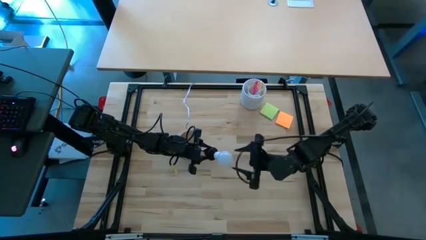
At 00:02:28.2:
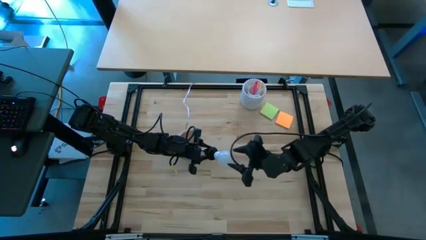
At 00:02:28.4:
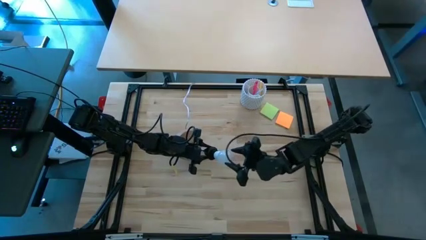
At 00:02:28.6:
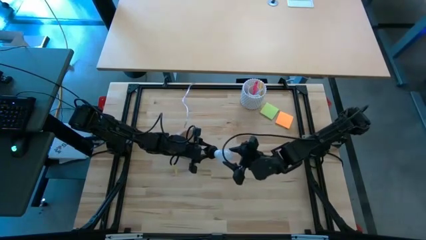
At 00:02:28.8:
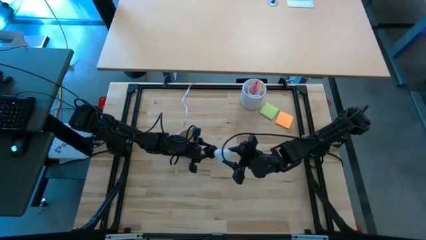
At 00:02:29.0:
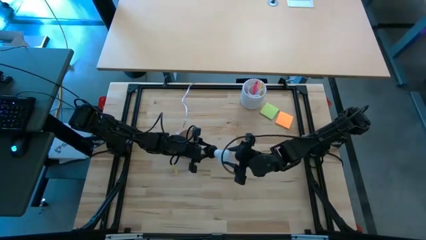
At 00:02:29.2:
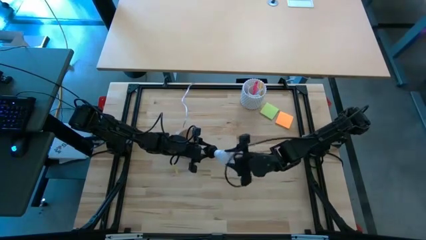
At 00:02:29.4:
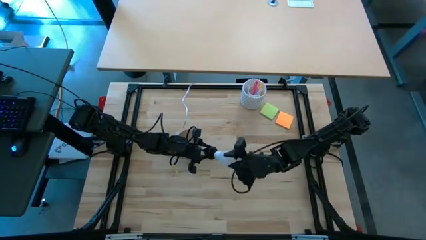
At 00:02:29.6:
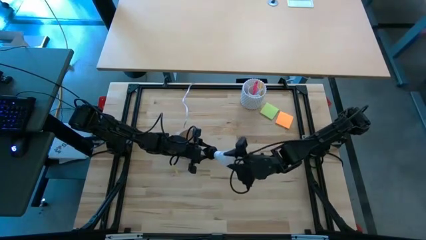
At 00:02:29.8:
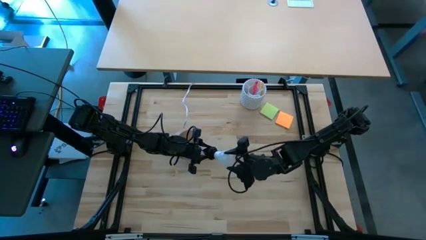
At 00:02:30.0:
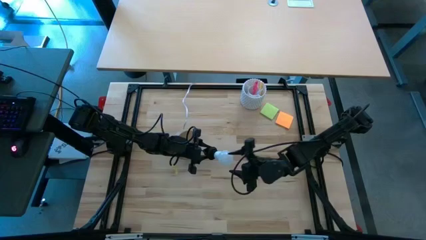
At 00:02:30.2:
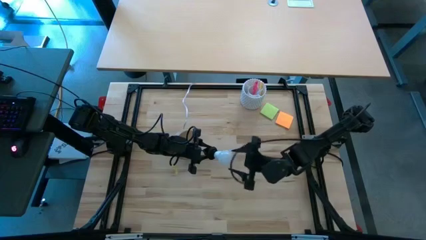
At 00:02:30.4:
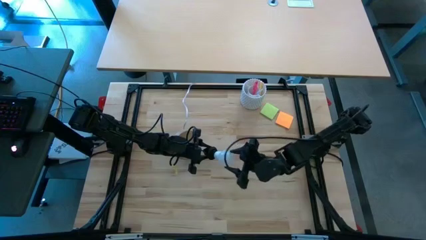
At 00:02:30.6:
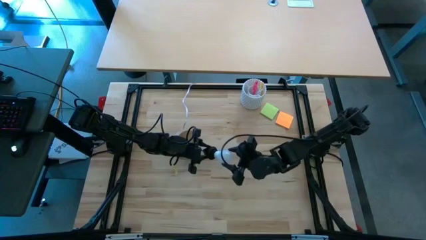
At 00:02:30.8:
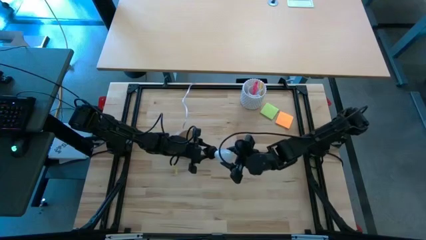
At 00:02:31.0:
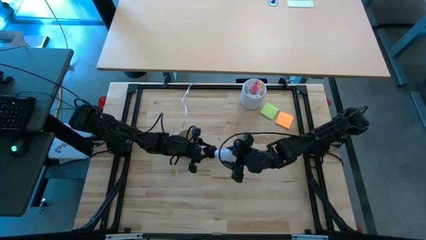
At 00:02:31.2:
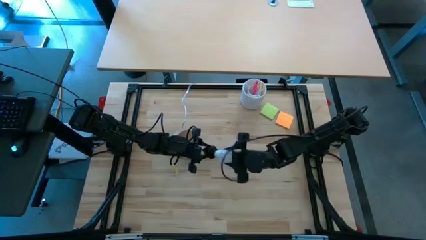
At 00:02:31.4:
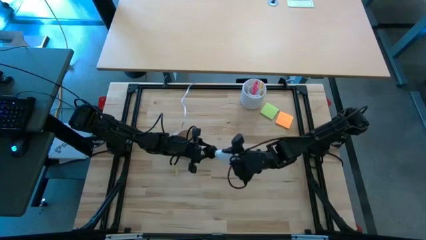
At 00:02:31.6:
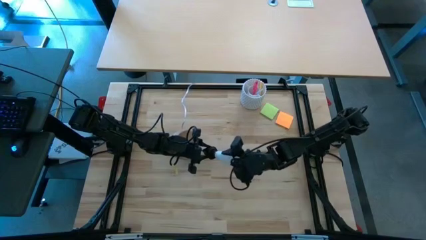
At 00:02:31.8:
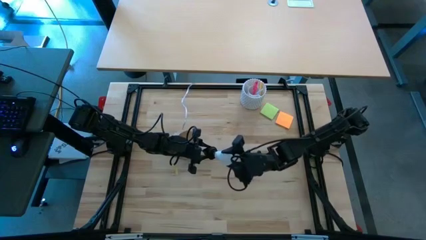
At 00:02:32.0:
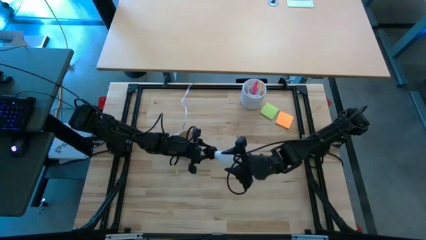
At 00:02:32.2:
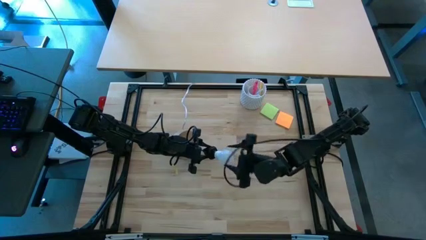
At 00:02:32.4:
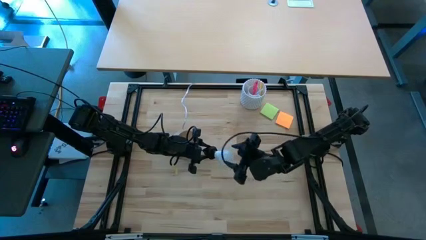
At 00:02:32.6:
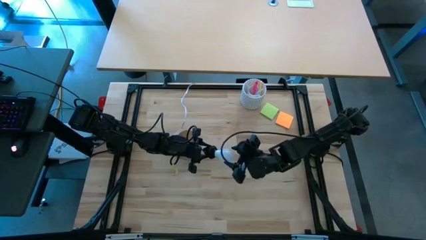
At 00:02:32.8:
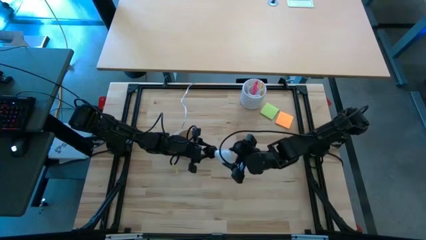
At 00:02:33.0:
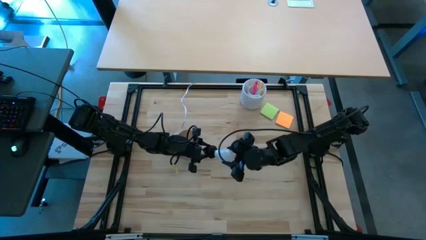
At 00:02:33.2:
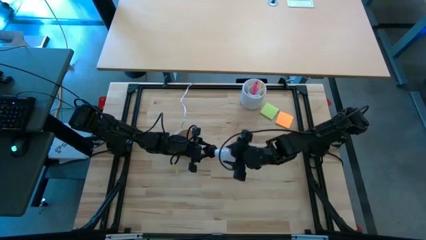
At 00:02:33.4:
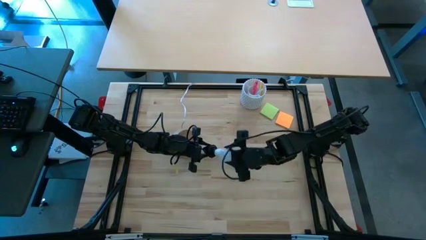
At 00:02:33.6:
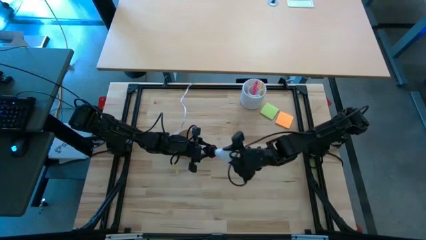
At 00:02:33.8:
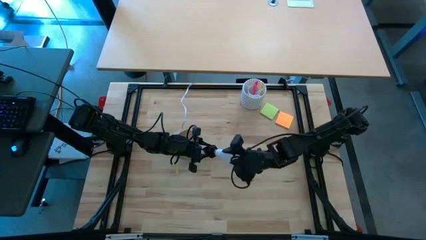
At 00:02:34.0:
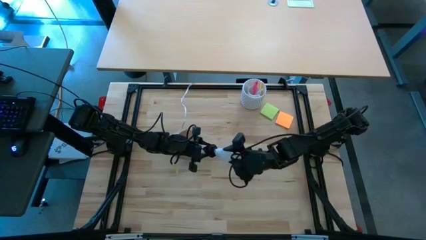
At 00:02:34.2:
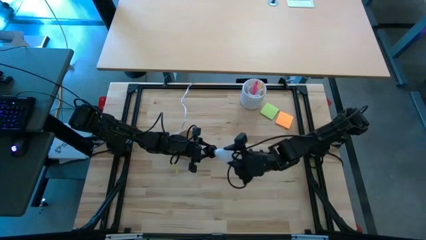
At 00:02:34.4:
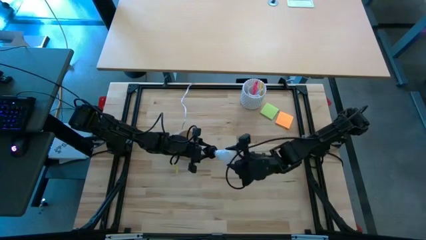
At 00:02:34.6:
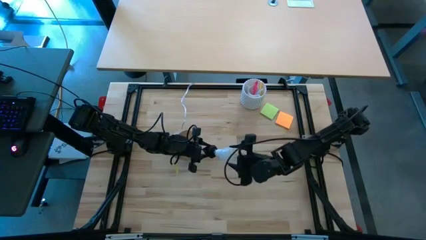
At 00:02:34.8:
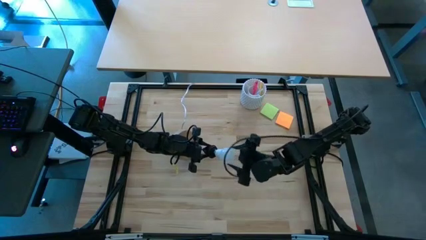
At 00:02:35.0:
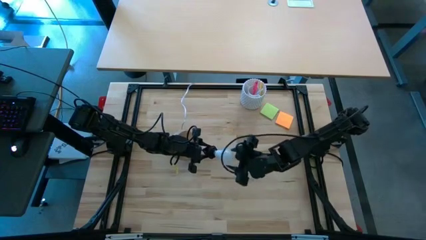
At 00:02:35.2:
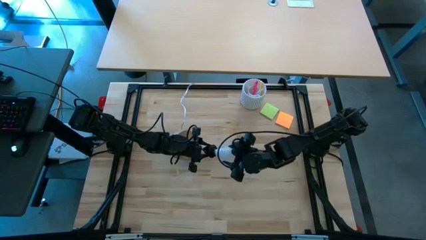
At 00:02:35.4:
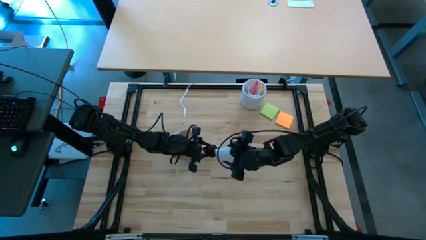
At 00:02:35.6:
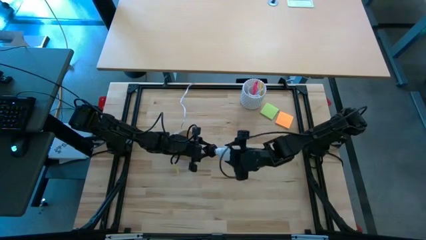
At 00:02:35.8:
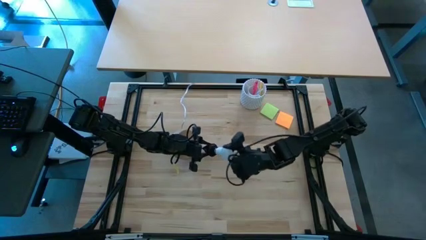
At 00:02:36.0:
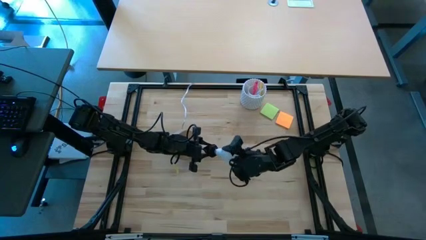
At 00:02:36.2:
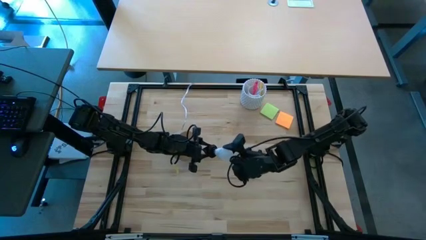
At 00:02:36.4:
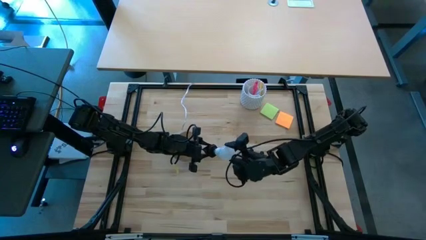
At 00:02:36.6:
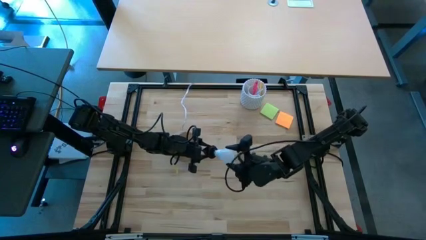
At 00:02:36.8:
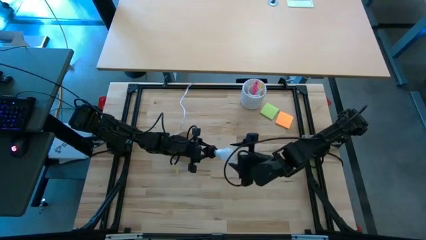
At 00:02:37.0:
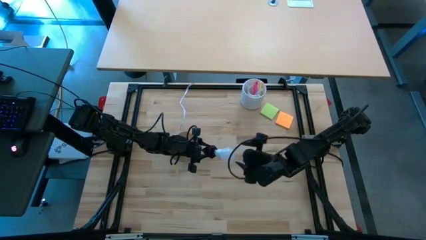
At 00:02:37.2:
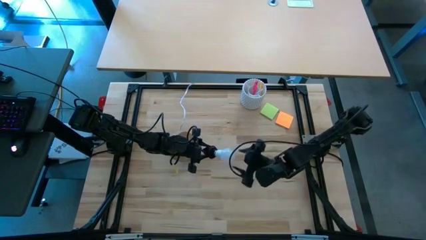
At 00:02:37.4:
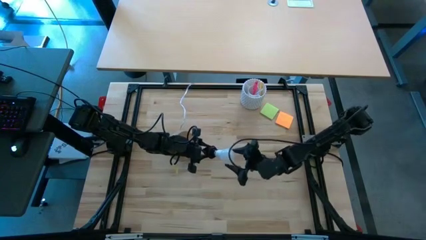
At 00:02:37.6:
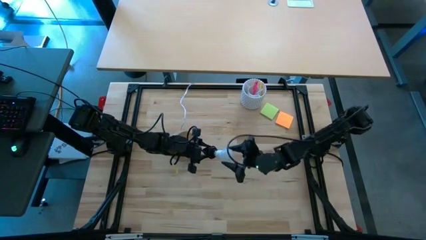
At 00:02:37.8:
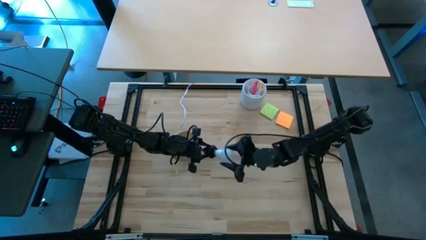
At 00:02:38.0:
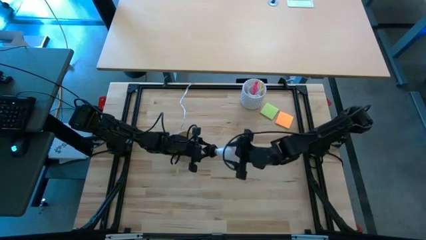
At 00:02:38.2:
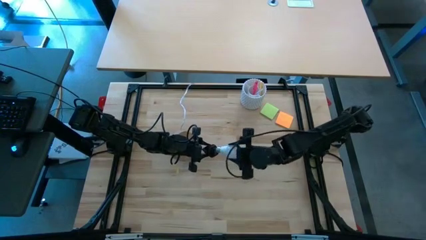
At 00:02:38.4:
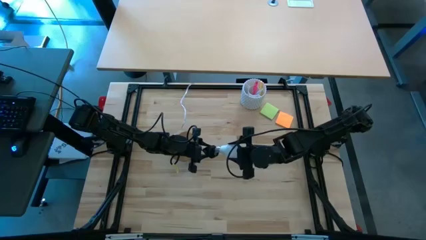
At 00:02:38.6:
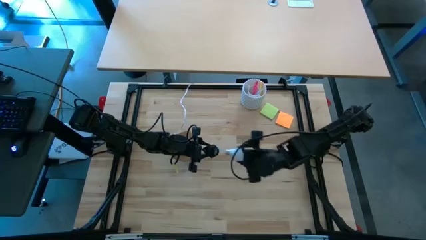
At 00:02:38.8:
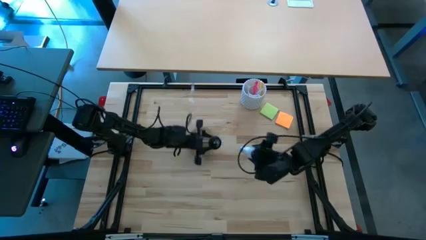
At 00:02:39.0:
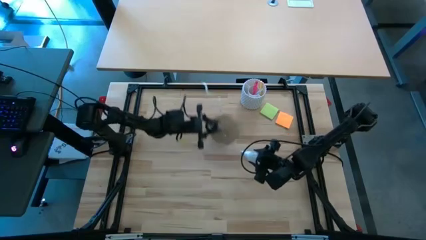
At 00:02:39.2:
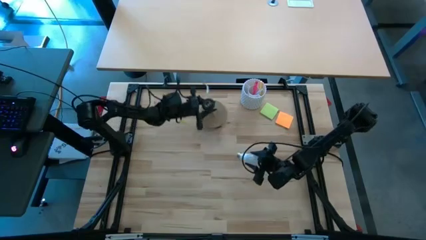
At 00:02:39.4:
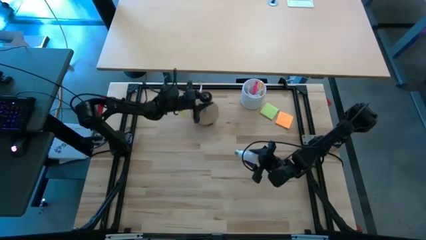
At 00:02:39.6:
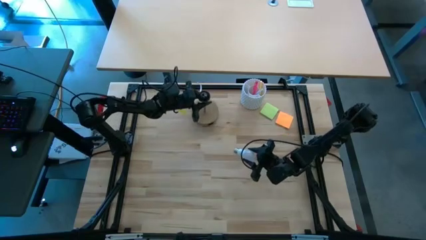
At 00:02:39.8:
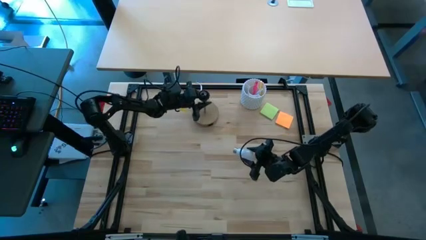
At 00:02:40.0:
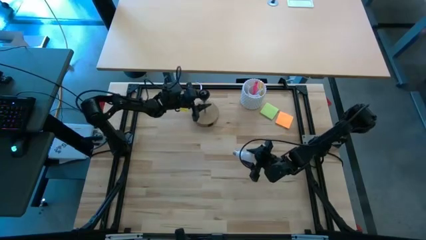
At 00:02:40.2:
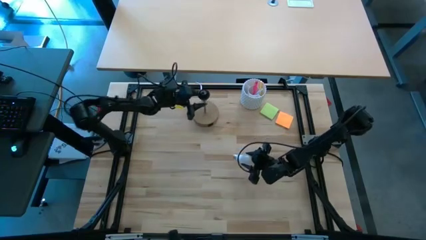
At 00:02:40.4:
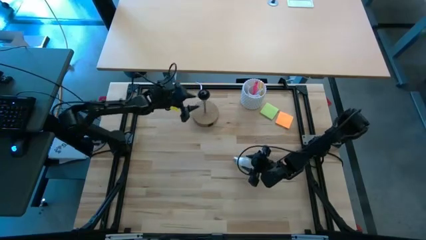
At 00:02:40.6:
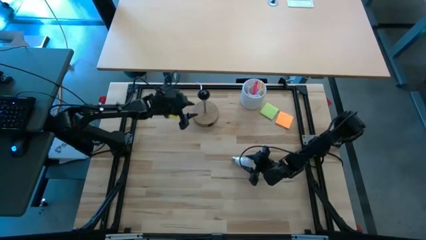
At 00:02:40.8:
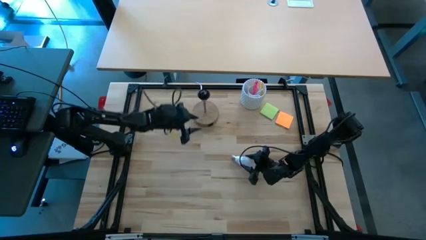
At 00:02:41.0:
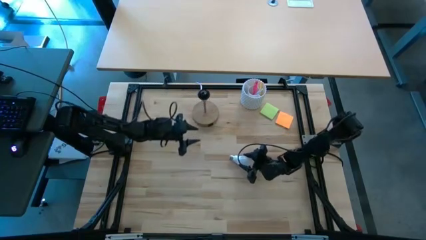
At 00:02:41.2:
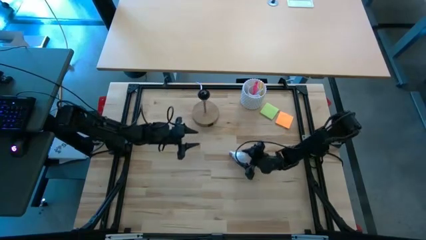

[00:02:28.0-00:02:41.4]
Task: Screw lightbulb
Remove the light bulb from the lamp

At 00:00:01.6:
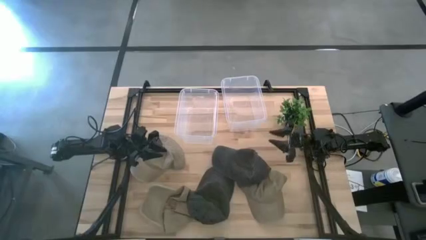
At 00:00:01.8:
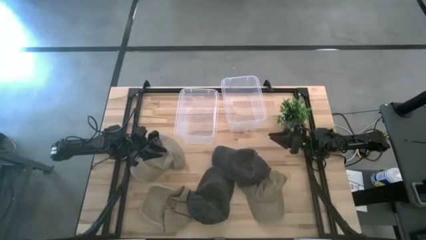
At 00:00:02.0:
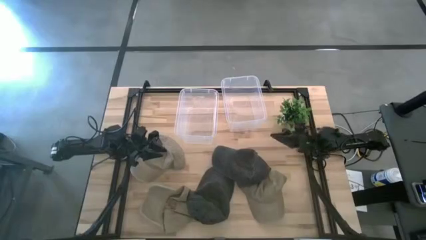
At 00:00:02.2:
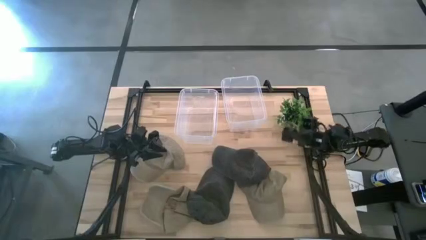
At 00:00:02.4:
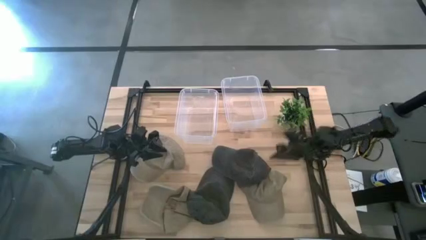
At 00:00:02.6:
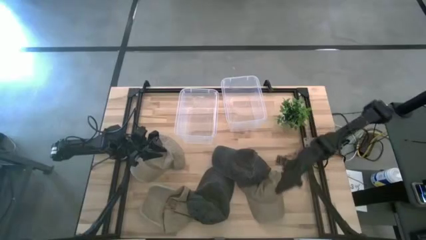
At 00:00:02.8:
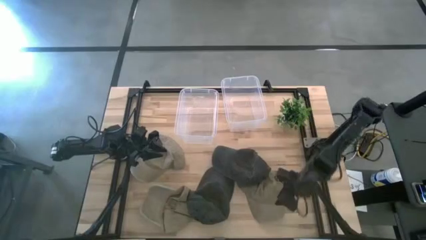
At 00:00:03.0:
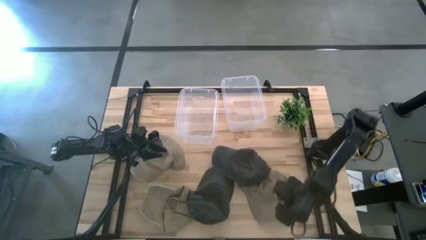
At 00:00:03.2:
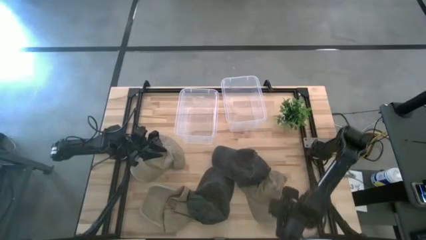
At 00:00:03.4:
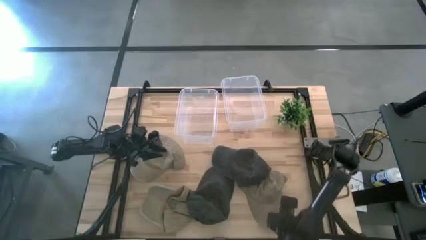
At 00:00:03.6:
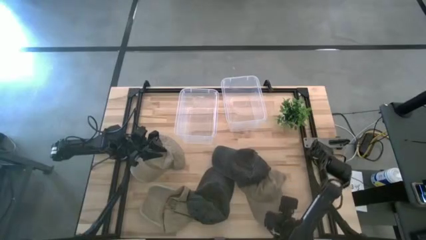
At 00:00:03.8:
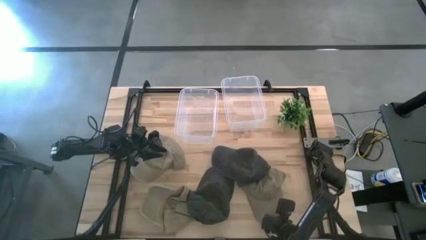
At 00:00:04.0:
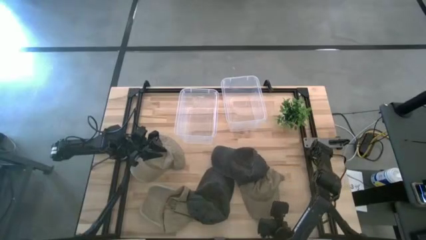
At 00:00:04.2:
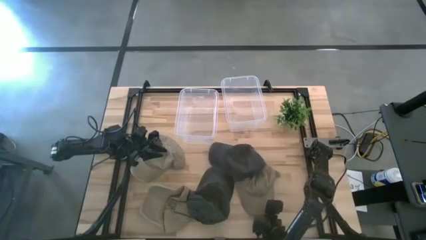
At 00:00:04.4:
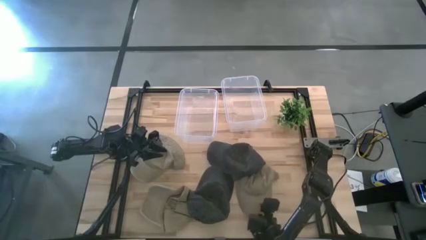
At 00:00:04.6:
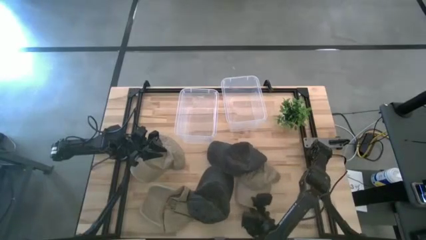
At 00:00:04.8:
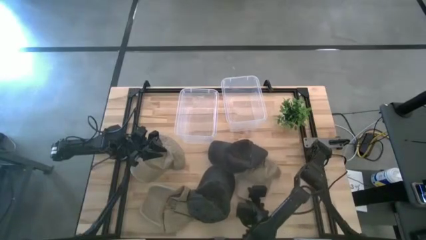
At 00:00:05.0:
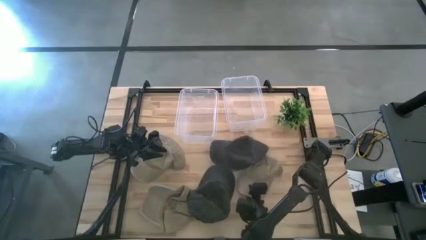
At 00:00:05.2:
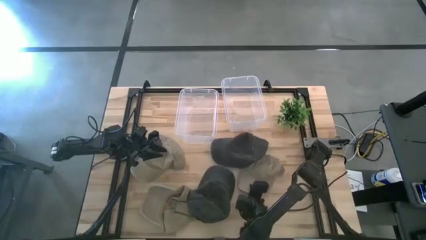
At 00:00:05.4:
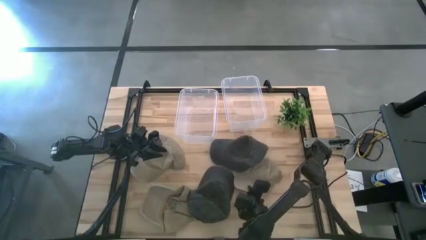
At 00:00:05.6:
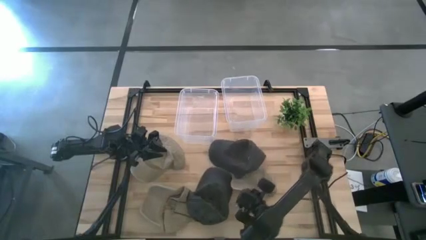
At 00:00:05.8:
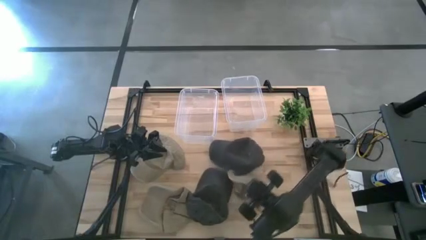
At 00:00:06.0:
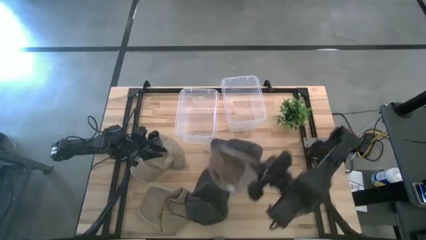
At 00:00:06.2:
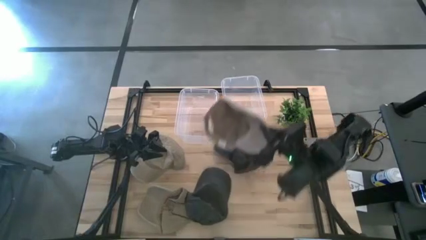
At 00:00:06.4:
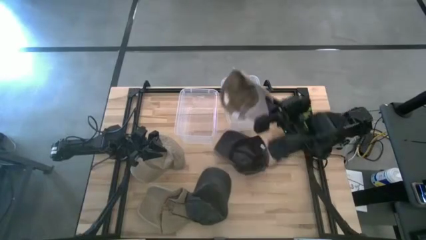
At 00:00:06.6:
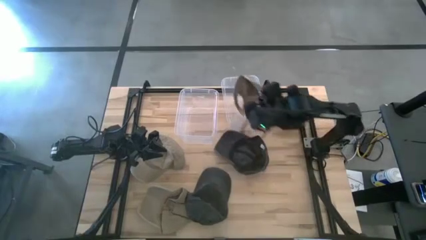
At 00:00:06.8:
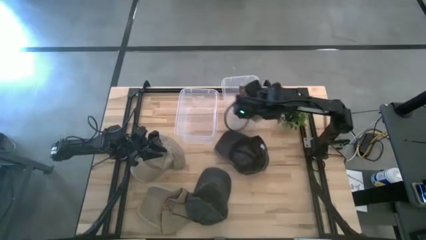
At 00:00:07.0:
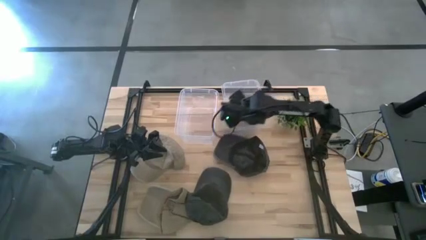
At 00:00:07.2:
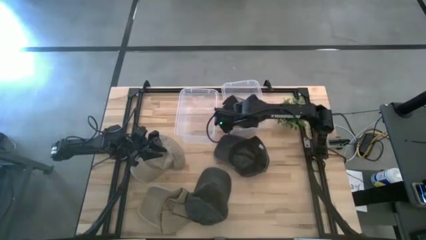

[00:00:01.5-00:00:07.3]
Task: Pick & Place hat
Put the bottom right brown hat into the right transparent bin
